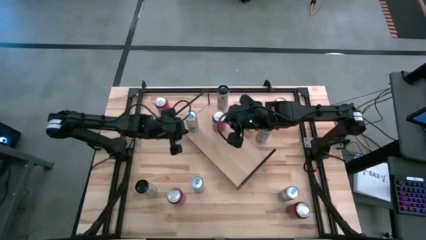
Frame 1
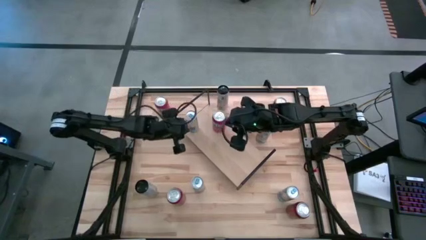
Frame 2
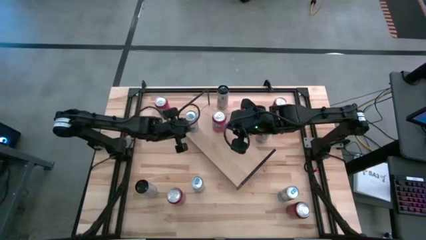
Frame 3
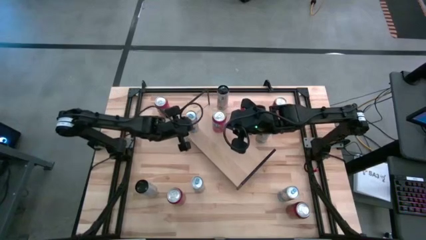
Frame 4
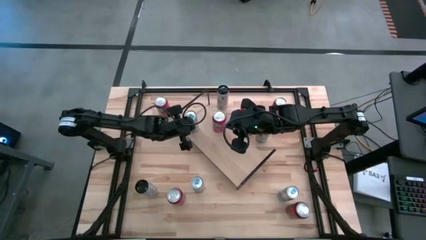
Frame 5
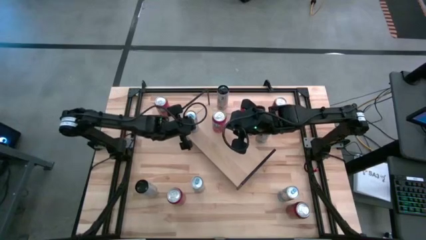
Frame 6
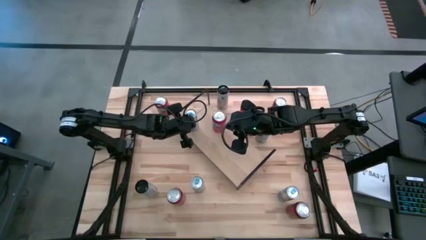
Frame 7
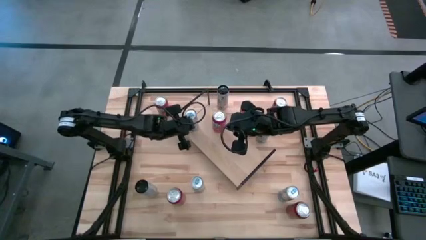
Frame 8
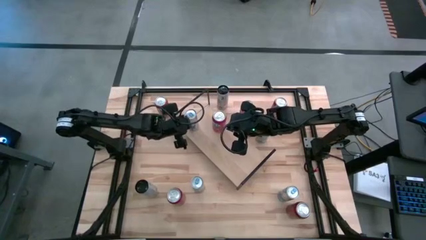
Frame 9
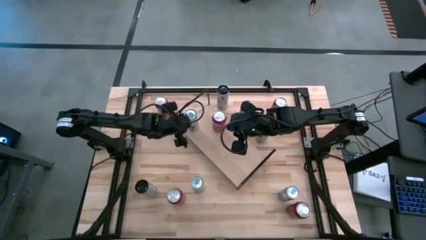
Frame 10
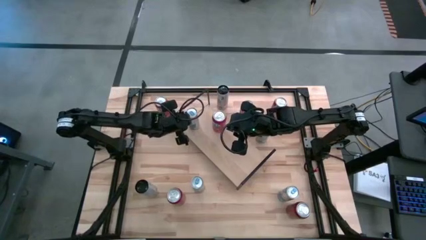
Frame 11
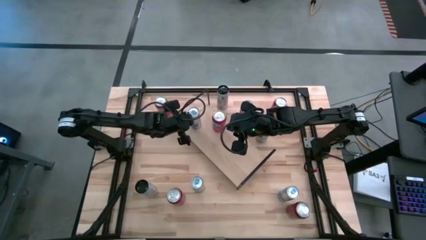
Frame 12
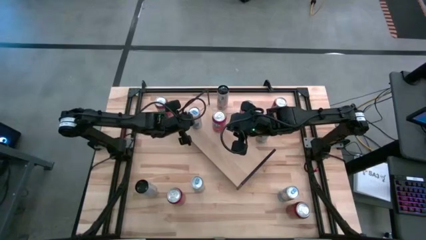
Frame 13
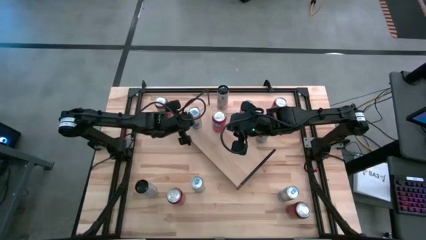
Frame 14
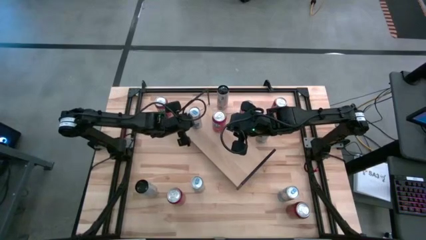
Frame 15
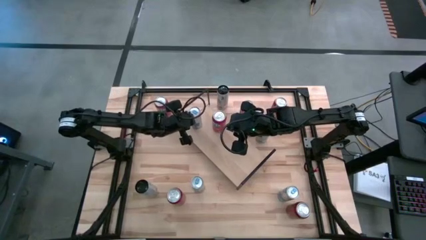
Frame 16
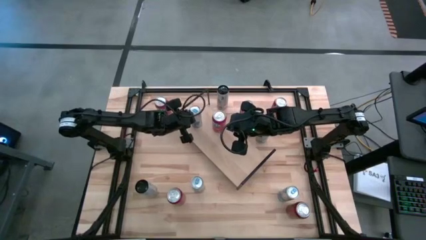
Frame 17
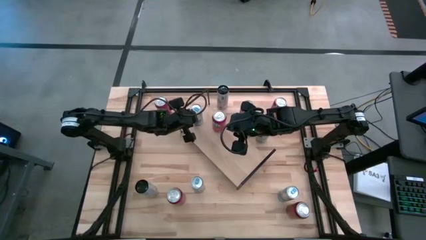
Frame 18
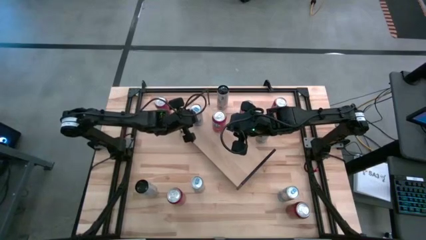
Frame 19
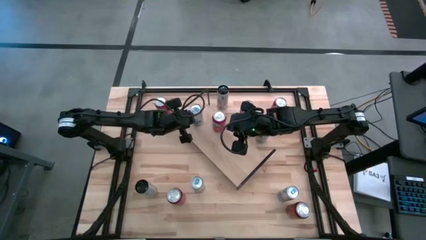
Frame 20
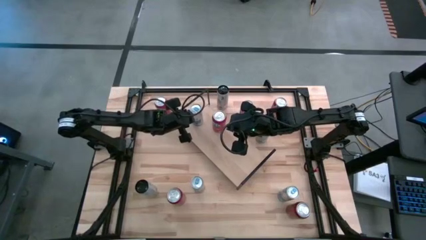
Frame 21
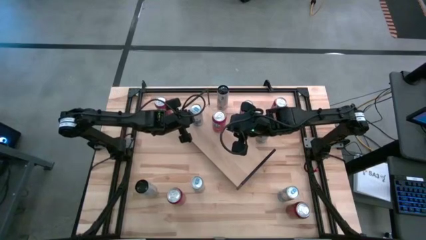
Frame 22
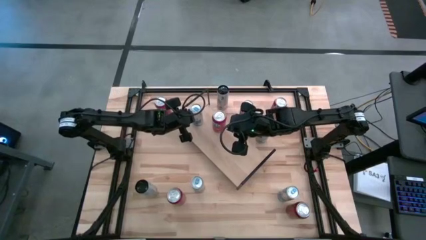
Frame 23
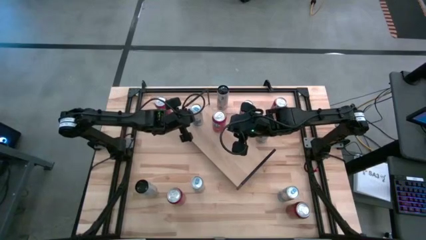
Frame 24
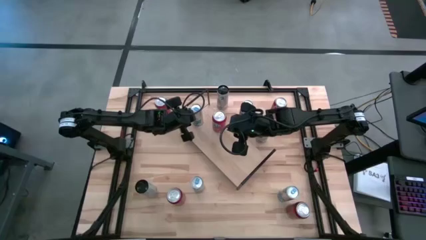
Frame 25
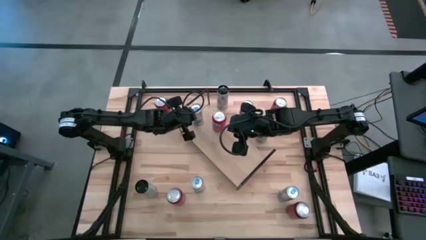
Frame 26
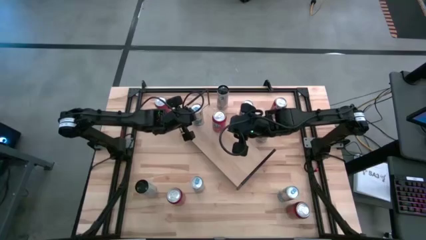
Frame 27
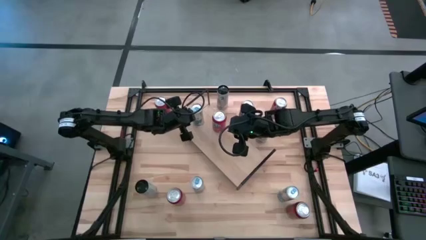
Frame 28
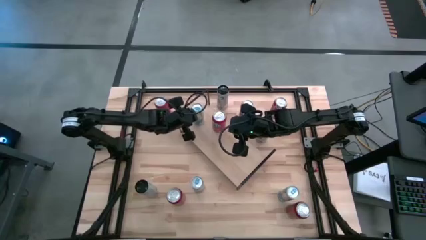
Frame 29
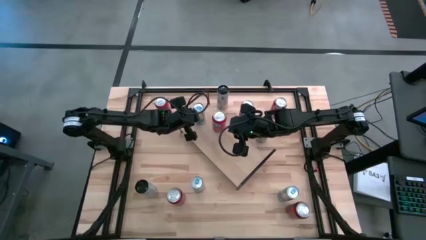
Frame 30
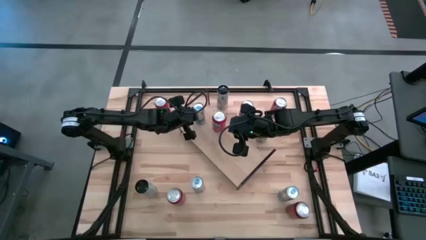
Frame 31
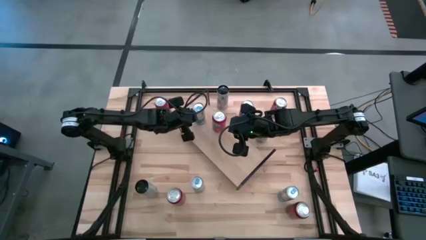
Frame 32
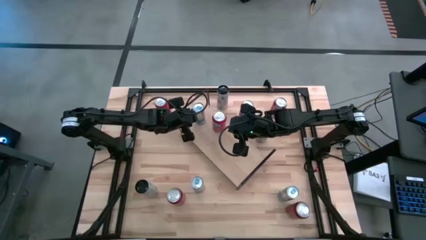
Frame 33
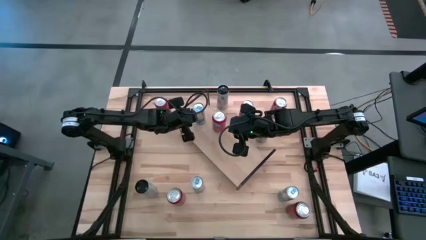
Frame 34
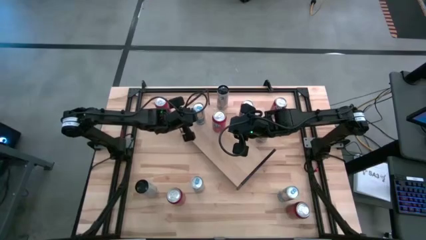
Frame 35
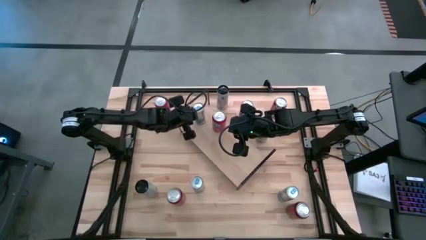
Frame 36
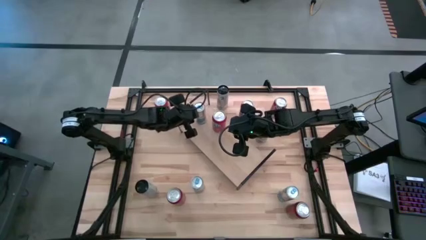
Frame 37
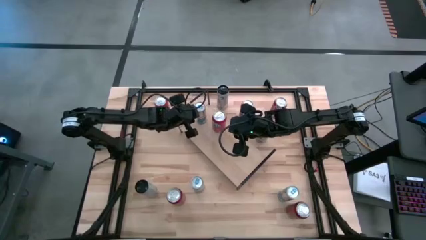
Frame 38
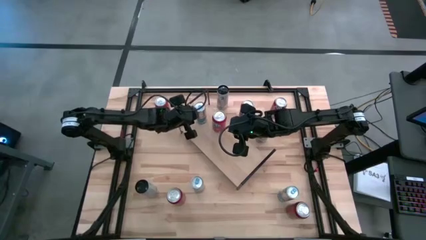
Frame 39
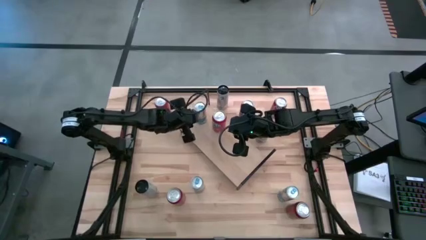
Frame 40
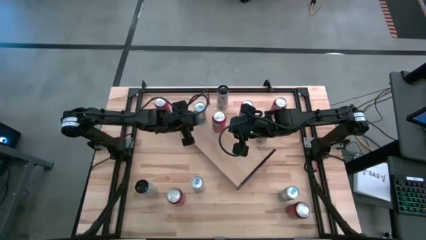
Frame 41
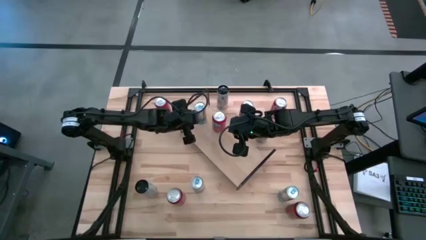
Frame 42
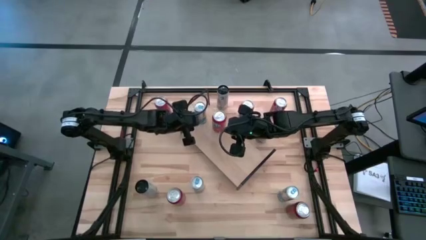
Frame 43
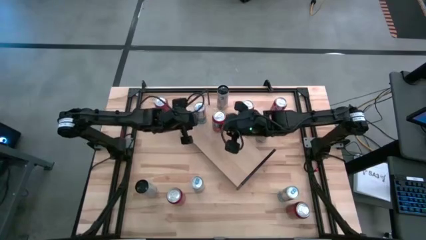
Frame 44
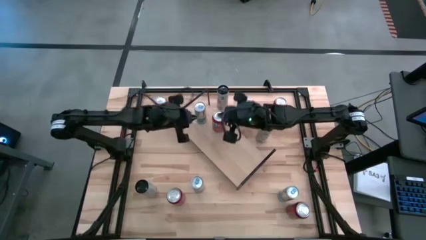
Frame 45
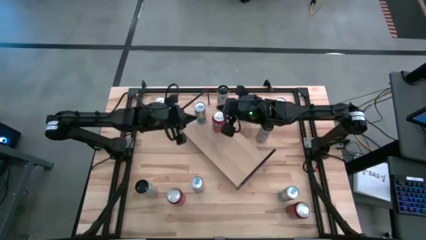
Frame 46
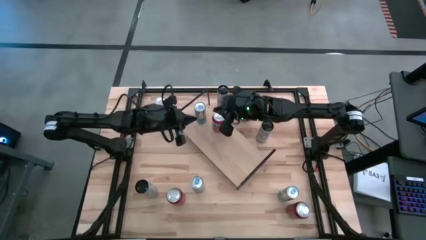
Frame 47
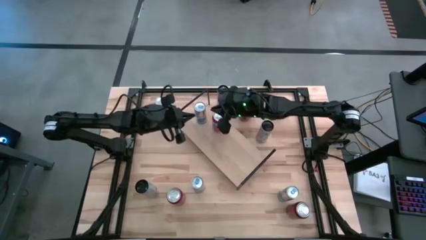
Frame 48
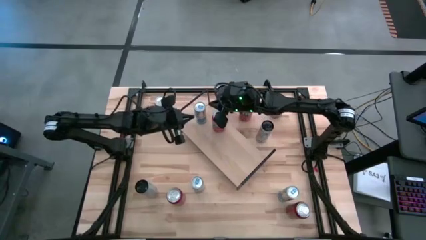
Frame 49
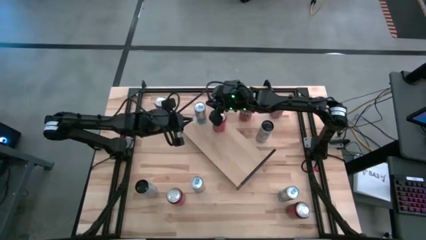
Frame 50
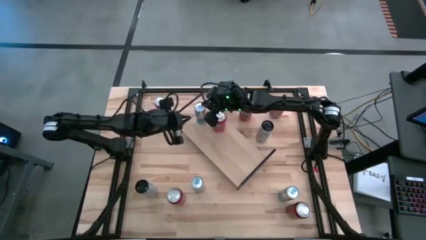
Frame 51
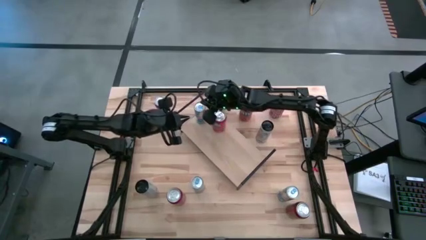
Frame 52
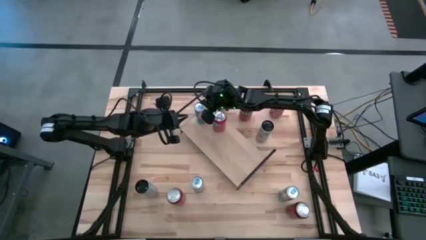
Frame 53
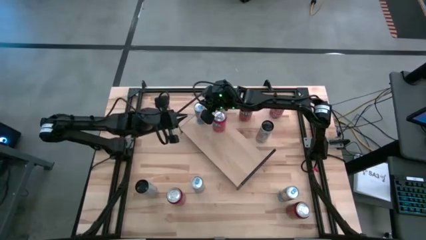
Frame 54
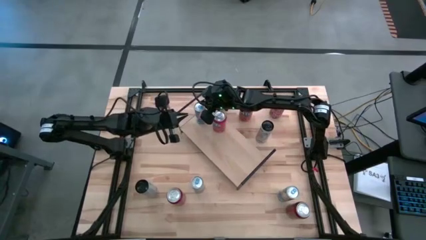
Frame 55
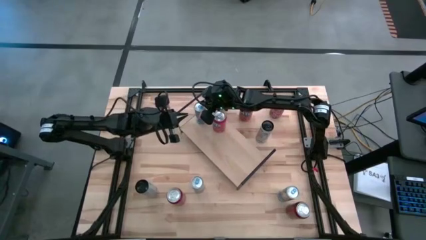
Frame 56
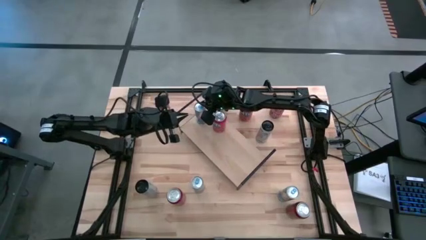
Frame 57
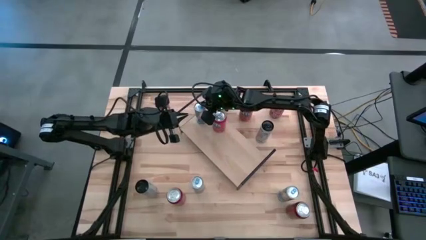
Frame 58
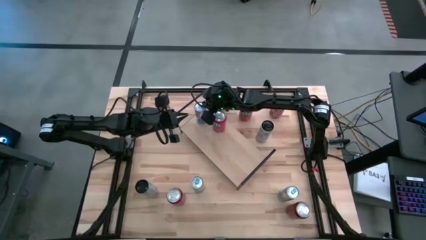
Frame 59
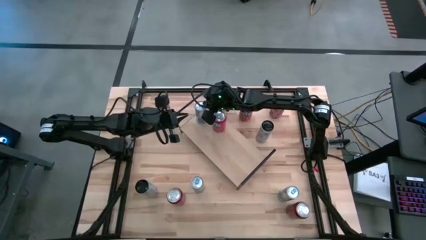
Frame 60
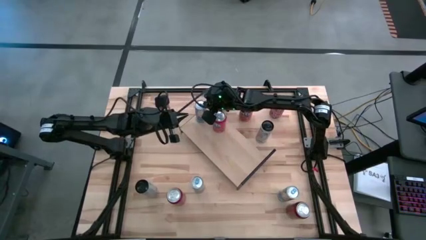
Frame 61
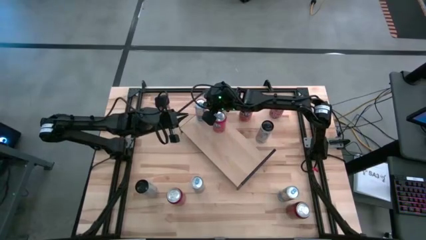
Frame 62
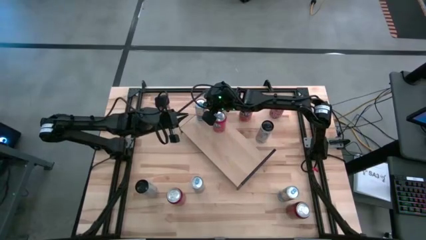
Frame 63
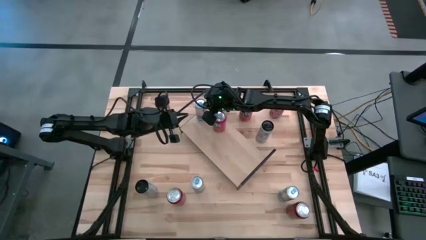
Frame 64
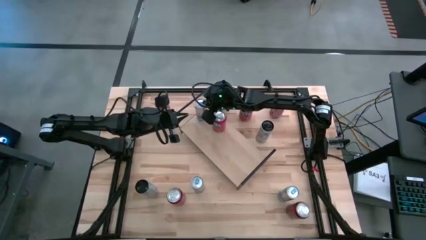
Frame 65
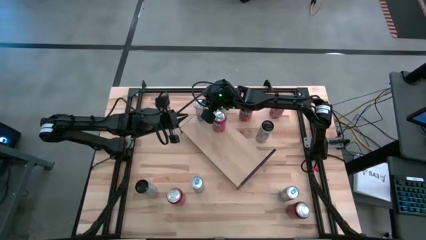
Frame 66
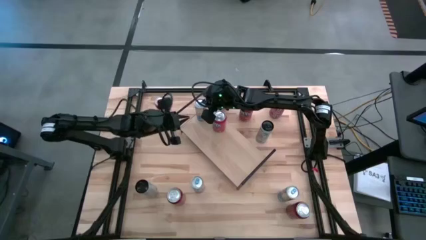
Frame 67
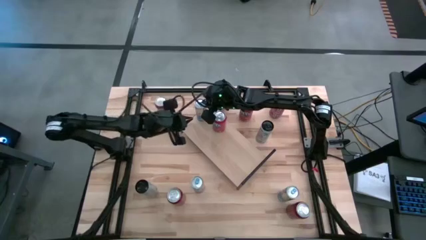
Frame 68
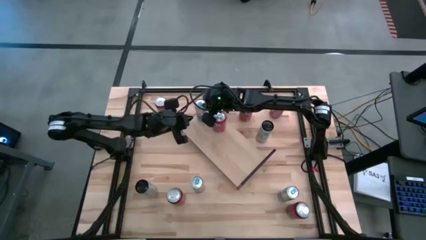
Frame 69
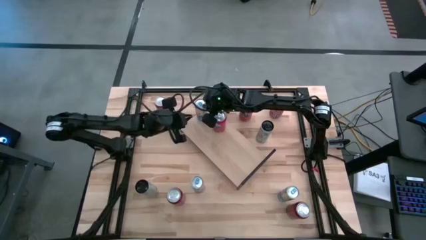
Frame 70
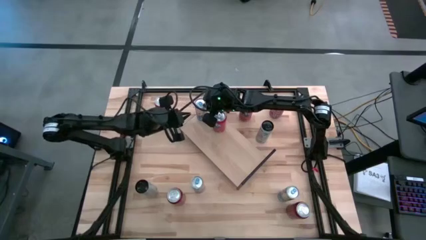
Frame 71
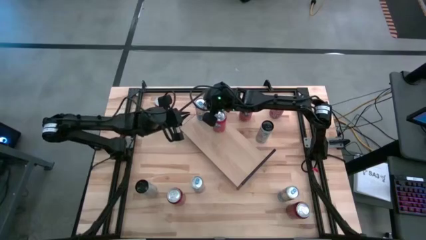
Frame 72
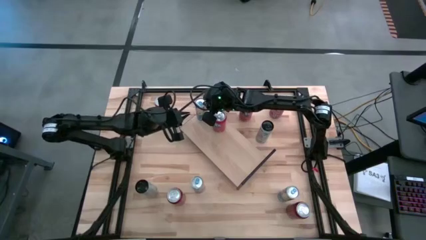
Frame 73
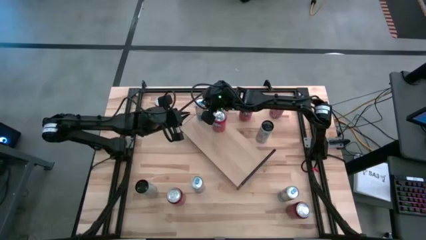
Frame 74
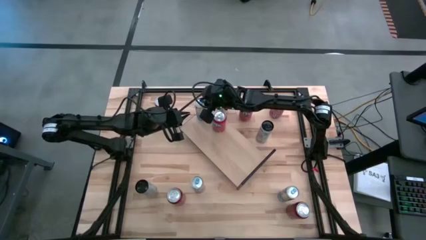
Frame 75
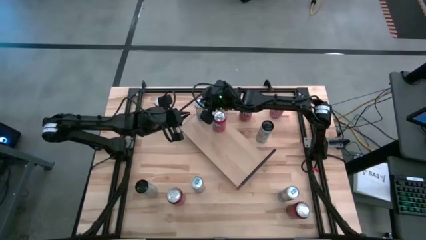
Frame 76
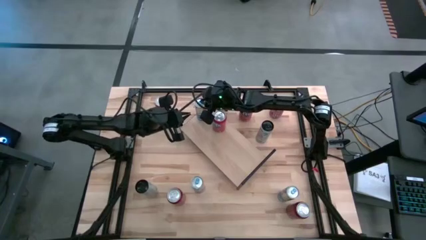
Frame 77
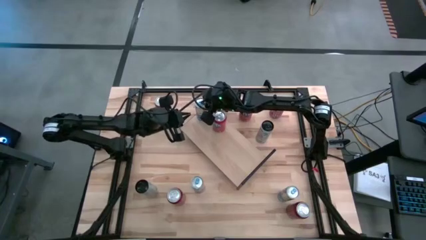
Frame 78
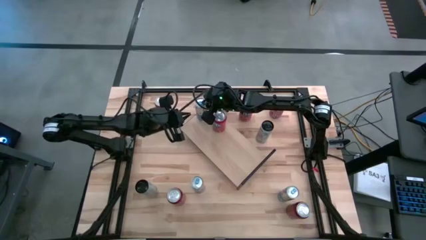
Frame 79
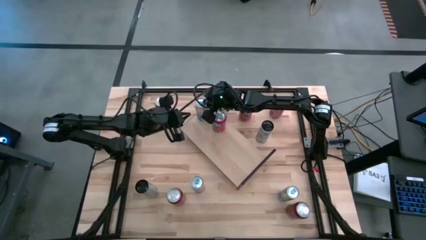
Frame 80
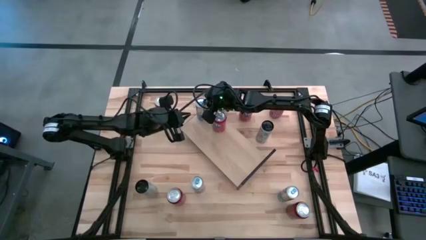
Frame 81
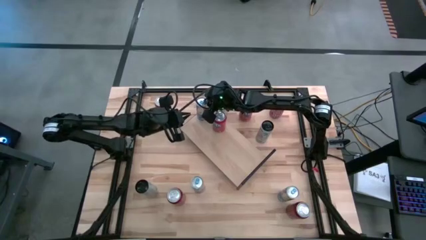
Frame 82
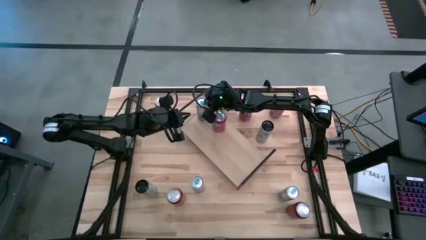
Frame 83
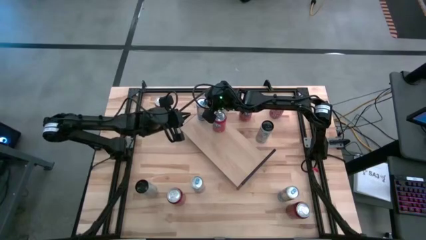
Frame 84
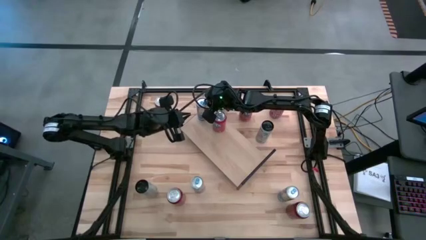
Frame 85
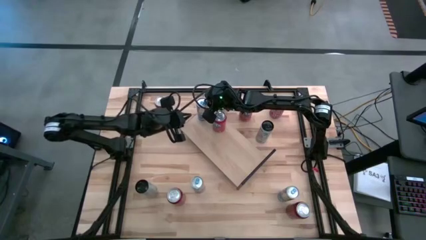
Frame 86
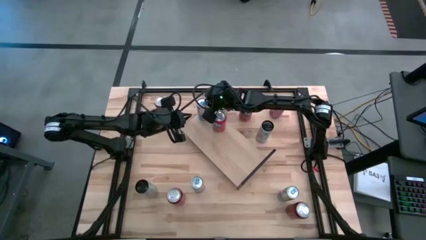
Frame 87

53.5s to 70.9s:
Task: Place canned beverage on shelf
Put the center blue soda can on the shelf
